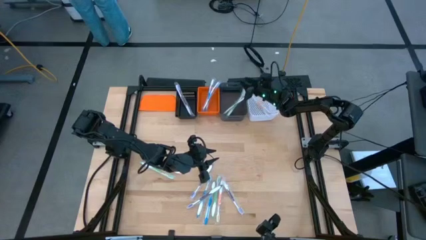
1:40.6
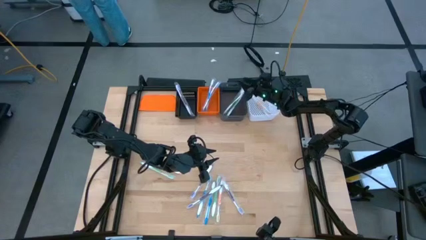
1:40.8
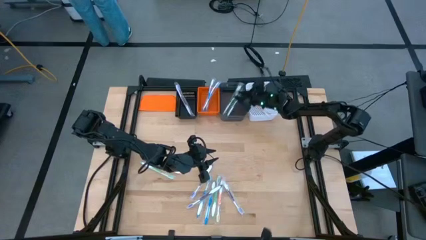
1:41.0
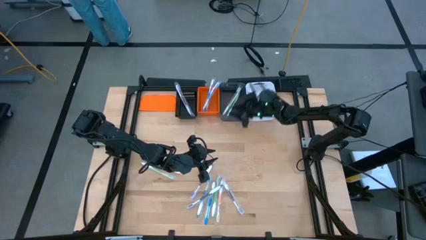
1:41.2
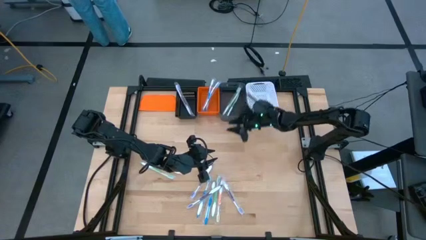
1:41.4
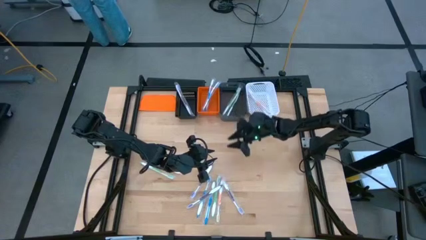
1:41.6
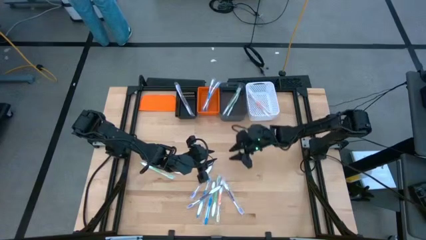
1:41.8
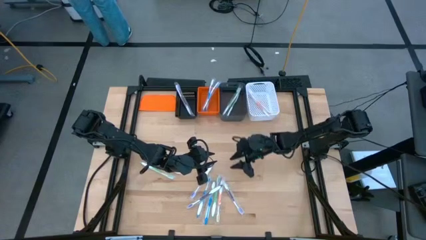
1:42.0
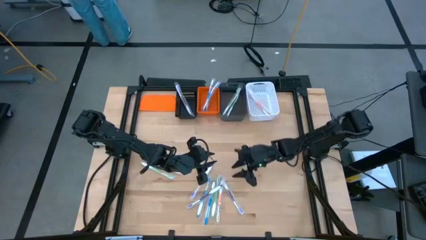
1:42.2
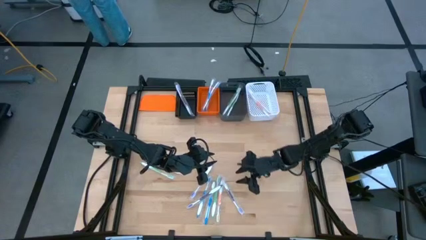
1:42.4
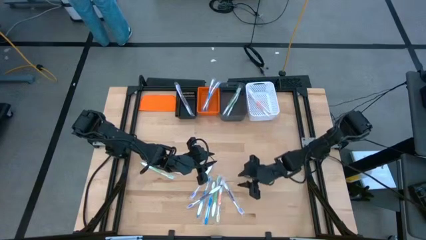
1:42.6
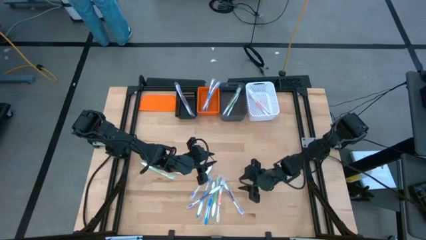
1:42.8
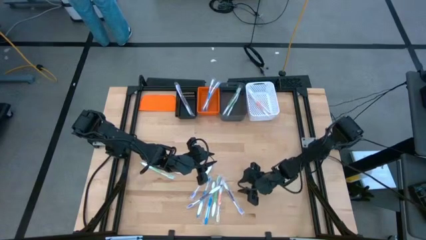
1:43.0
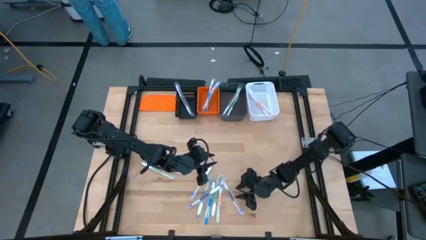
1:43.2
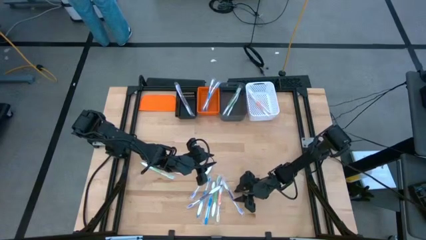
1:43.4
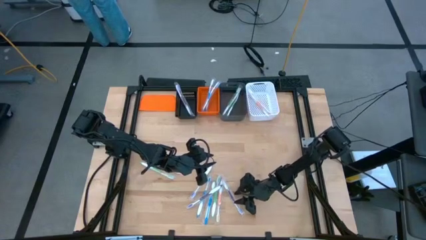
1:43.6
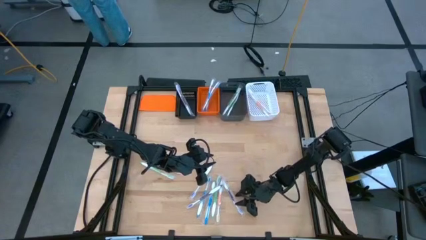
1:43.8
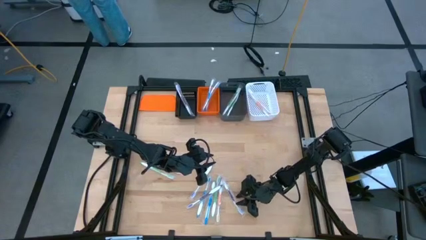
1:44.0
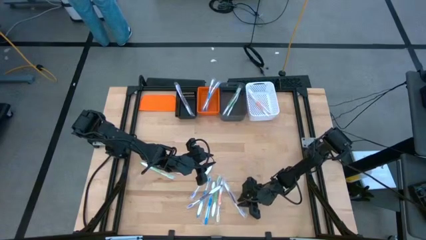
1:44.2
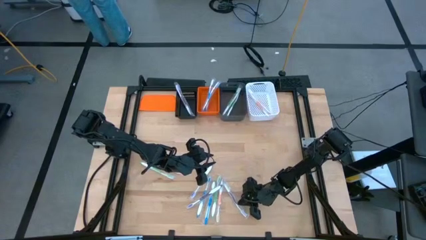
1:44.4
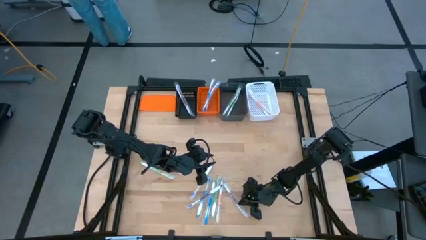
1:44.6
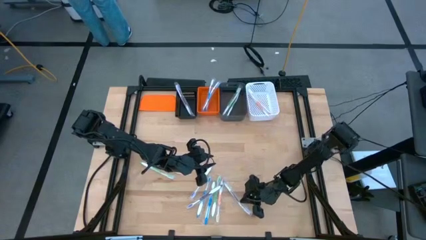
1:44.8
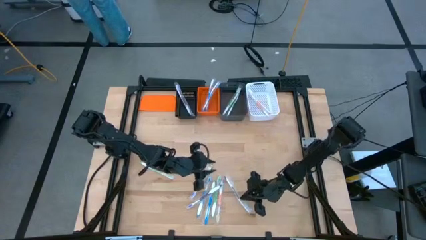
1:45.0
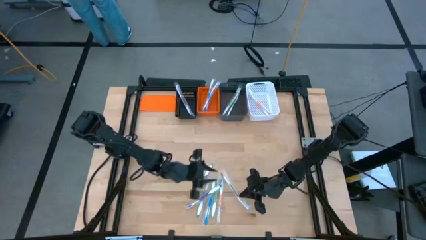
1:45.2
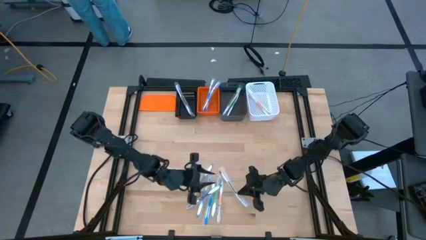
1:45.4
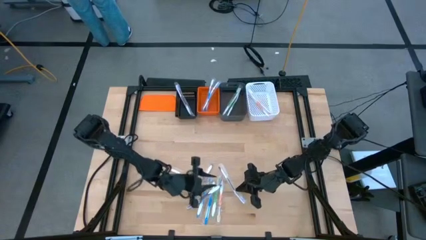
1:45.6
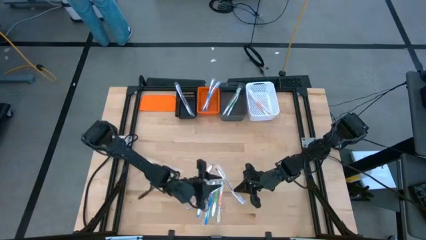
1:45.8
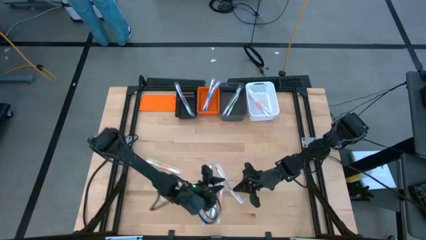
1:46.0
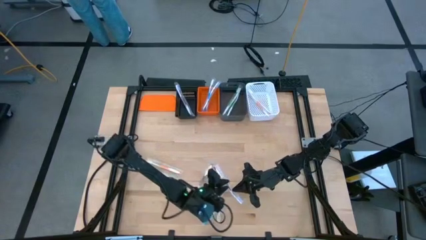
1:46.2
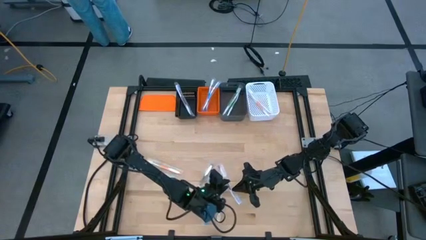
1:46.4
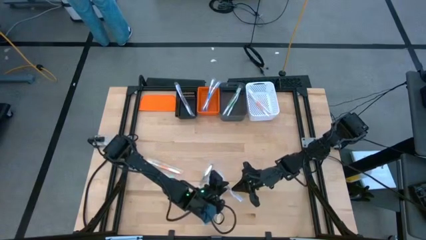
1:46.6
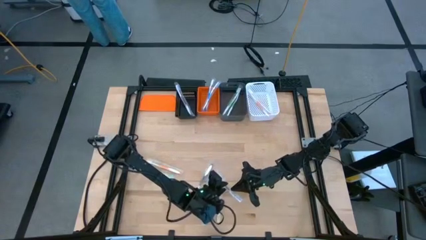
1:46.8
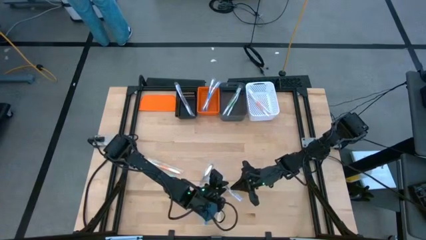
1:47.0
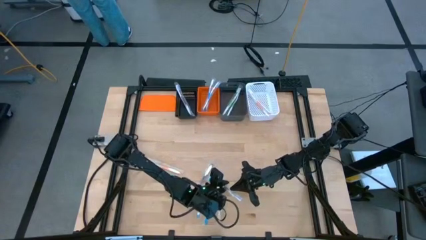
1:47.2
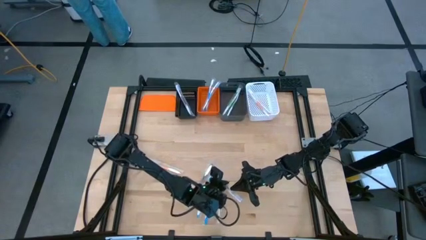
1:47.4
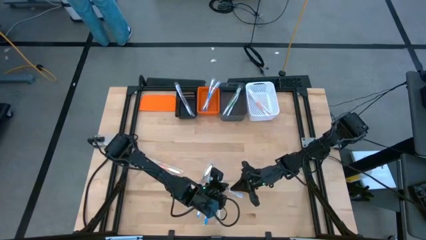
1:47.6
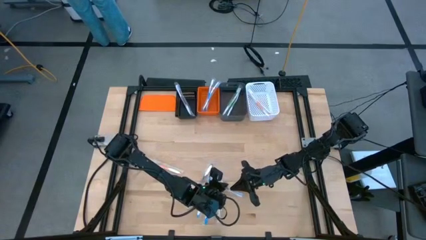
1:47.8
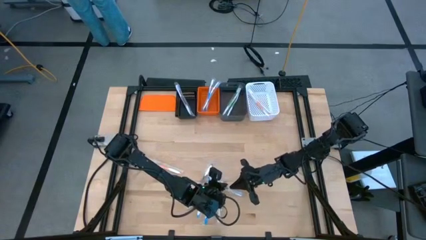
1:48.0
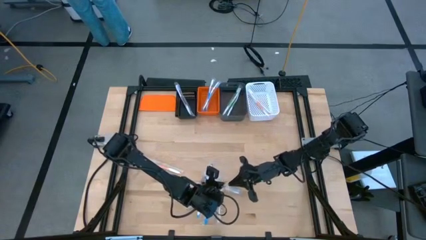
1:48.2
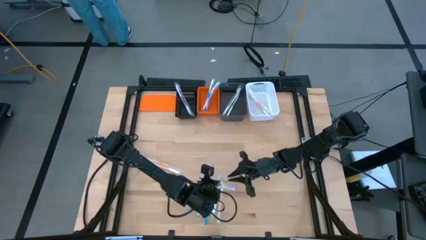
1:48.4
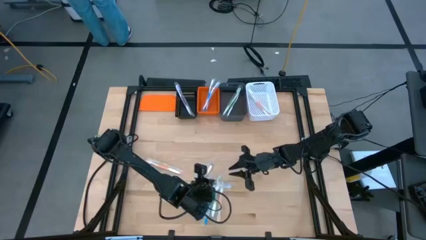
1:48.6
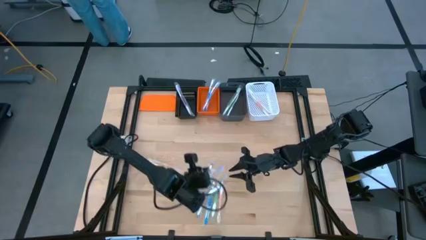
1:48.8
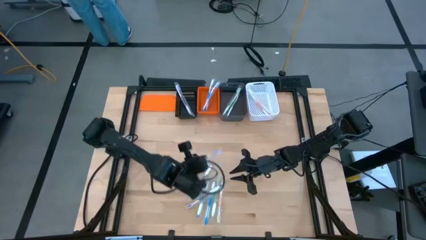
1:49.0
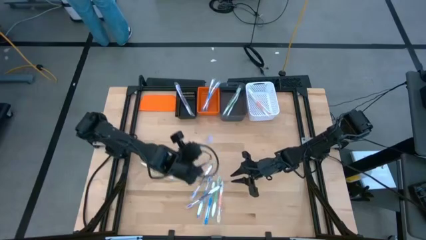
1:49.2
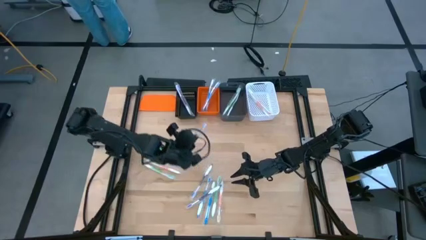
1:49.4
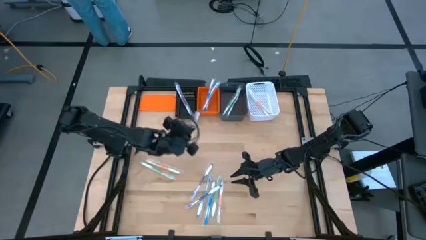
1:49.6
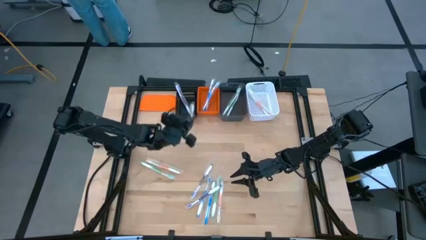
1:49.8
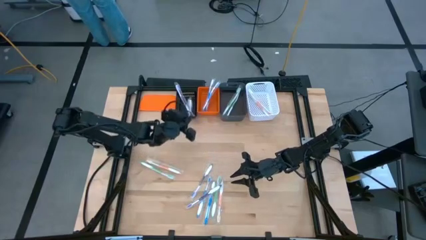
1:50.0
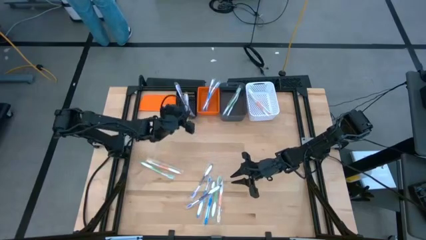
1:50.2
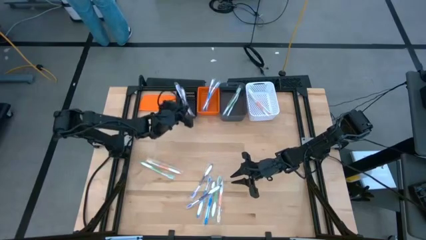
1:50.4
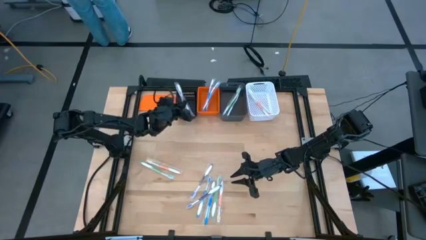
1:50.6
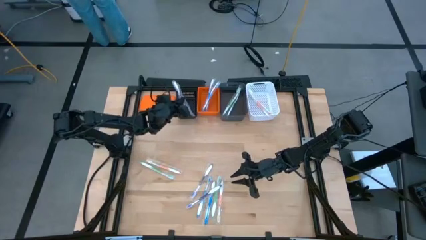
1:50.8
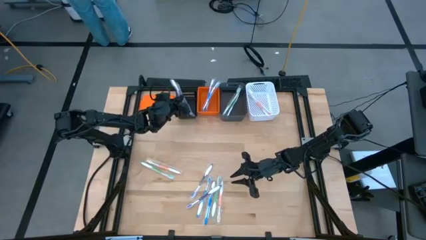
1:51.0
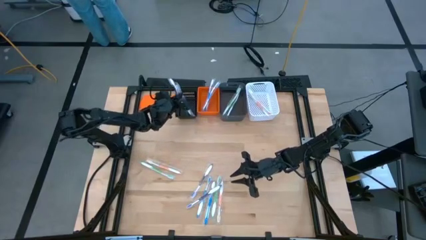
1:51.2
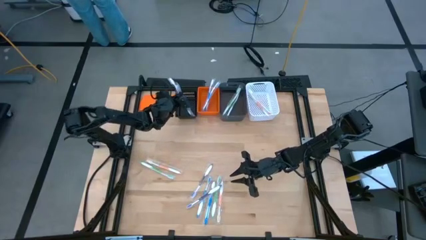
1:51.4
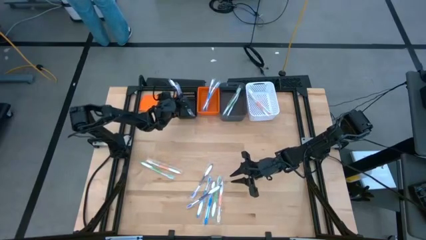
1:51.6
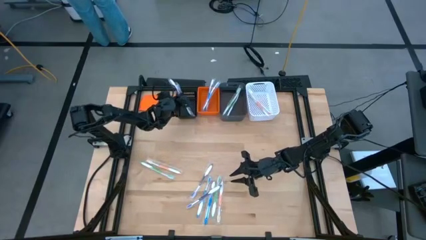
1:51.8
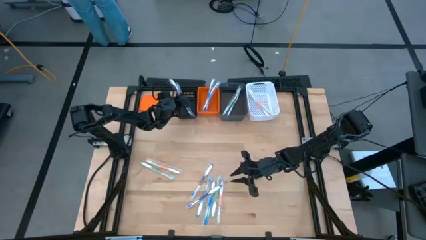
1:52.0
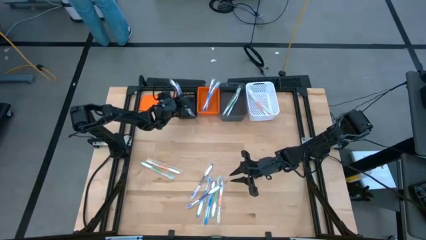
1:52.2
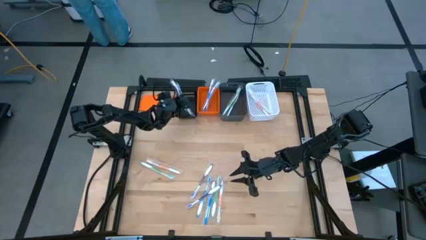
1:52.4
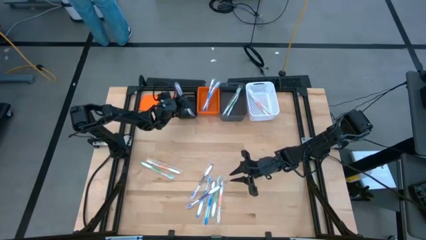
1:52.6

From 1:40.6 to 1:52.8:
Task: Pick & Place Toothbrushes
Put the violet toothbrush into the black basket

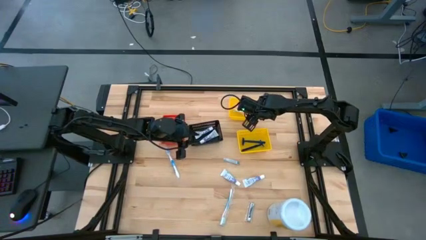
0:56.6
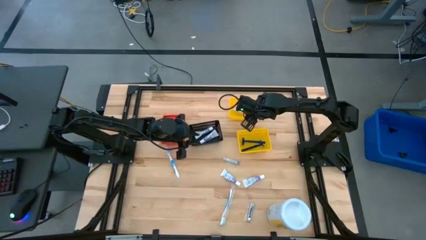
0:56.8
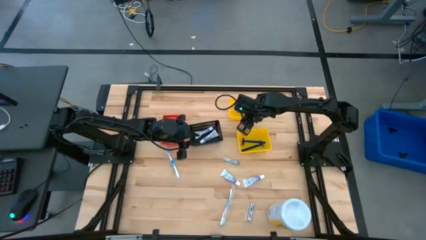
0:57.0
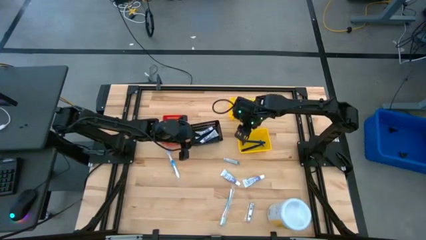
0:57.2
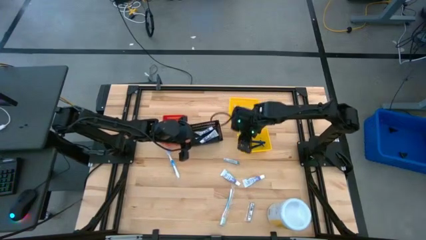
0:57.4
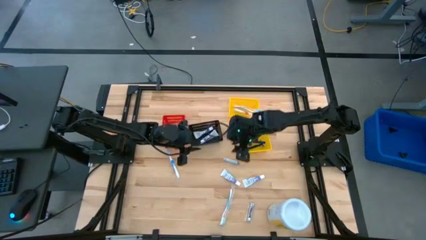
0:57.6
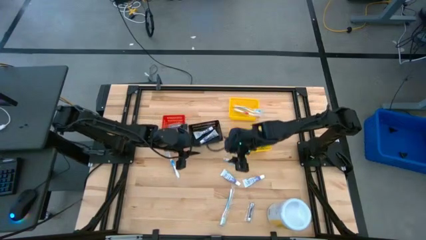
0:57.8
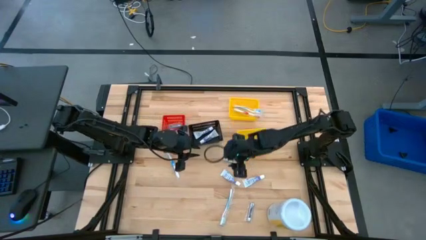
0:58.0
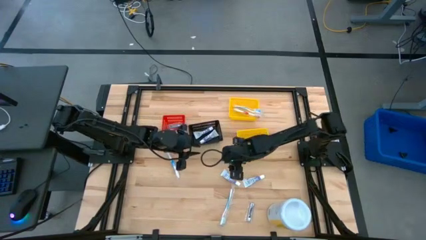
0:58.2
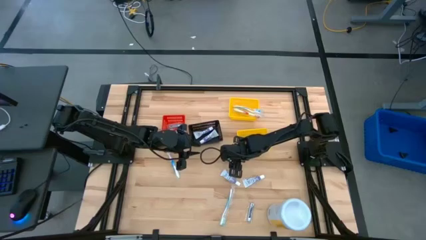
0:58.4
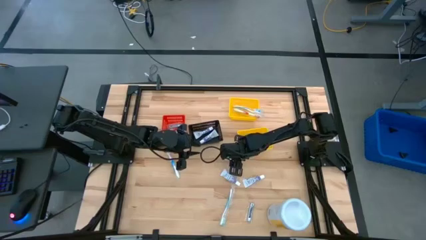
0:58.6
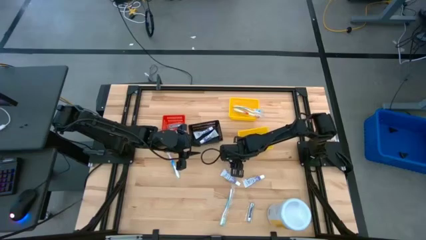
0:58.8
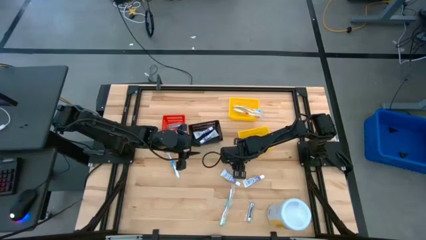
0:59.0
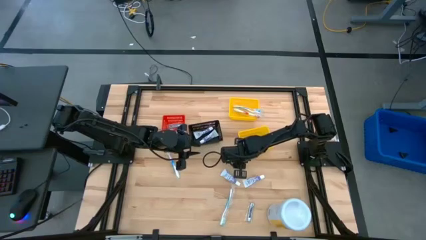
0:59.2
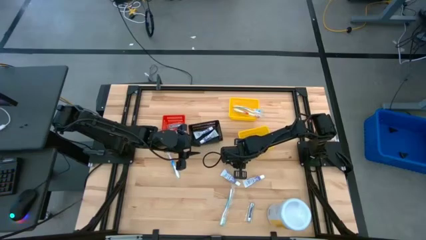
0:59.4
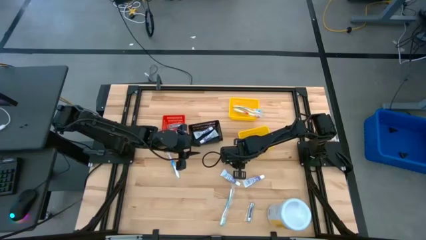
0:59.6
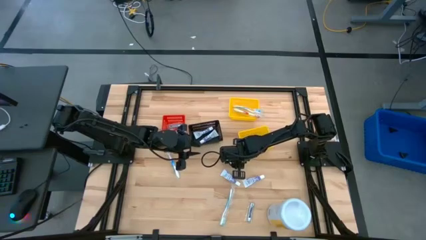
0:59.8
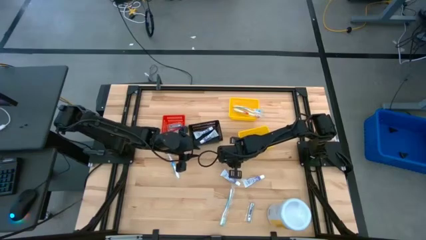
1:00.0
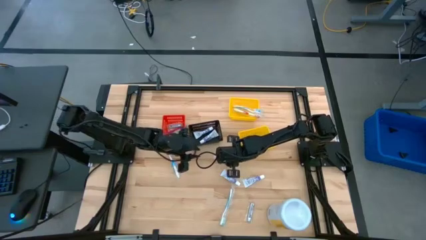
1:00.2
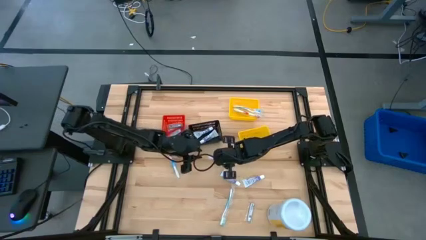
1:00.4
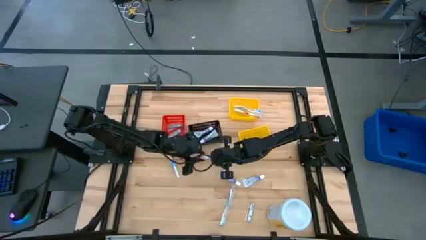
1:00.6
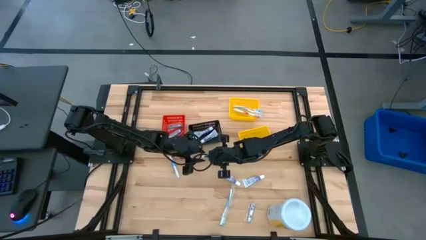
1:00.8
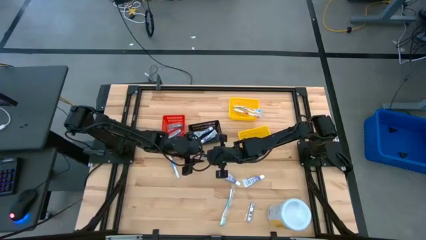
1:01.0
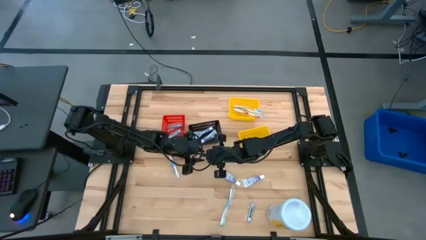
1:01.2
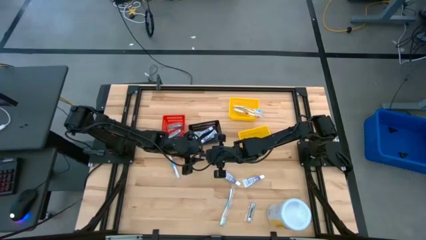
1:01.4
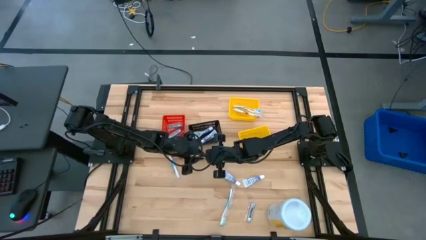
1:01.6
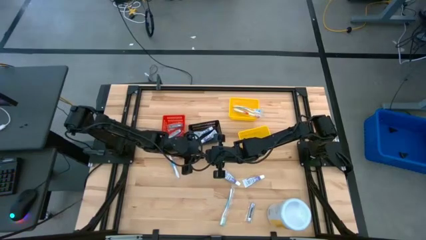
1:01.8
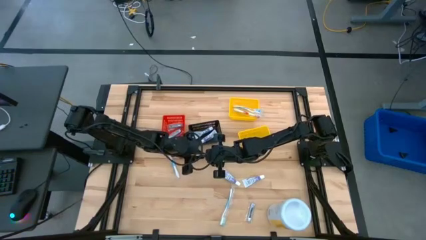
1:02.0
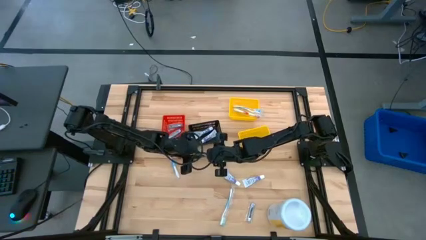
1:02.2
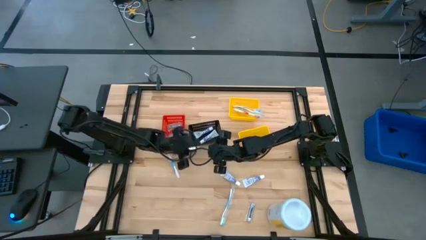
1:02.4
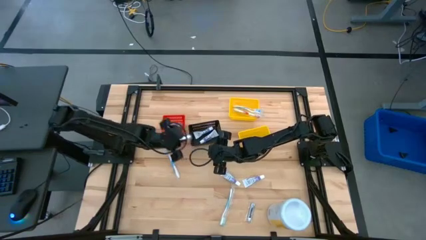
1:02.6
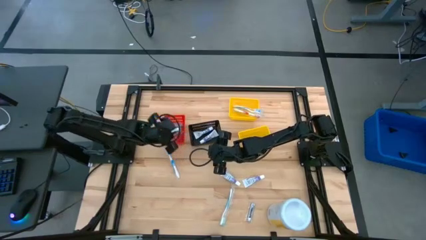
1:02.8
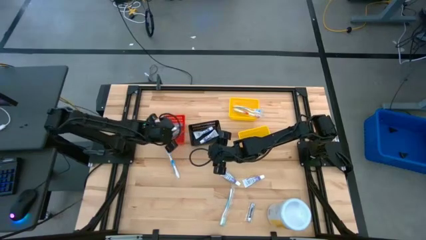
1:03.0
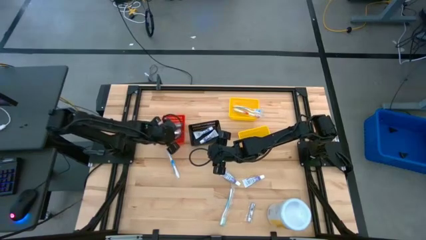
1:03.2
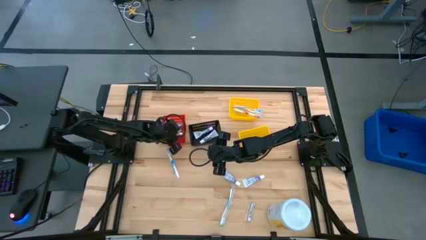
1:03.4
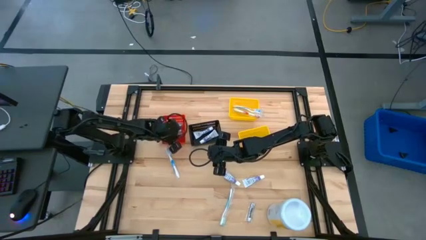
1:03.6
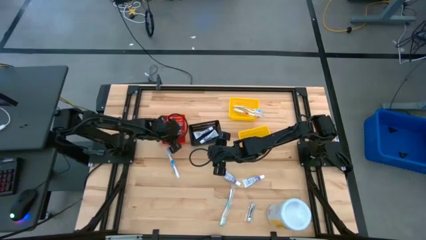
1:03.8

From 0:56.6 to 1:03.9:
Task: Pick & Place Travel size toiletries
Put the silver nail cutter into the red bin
